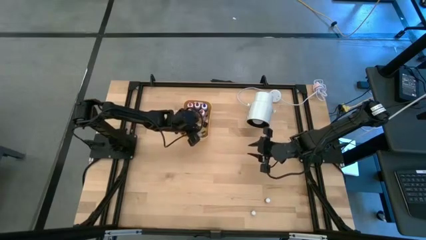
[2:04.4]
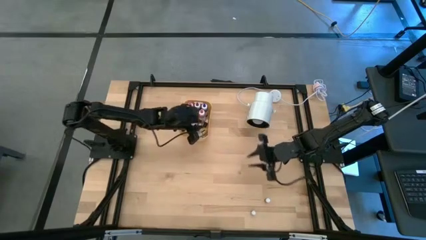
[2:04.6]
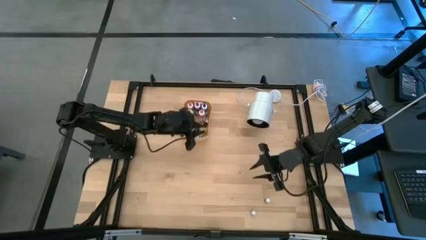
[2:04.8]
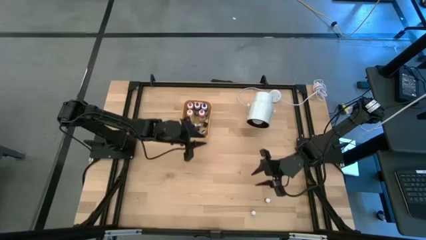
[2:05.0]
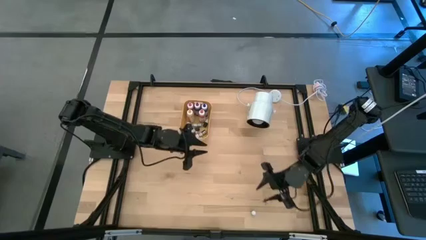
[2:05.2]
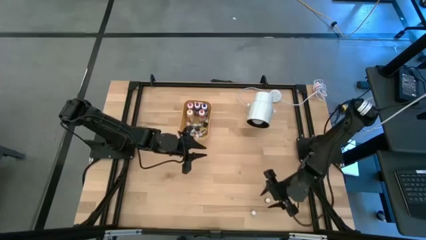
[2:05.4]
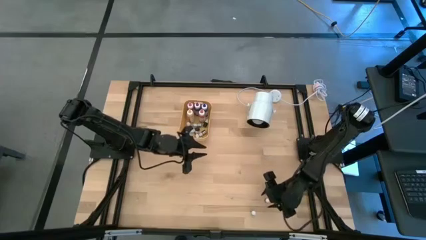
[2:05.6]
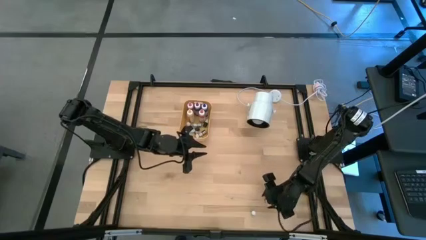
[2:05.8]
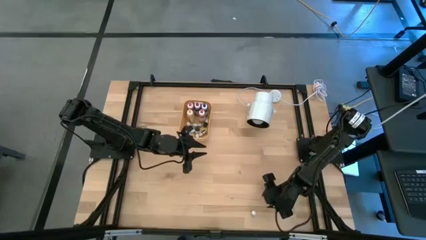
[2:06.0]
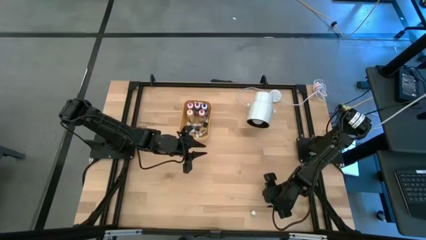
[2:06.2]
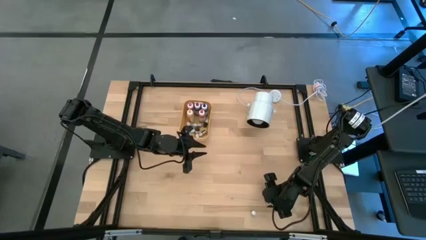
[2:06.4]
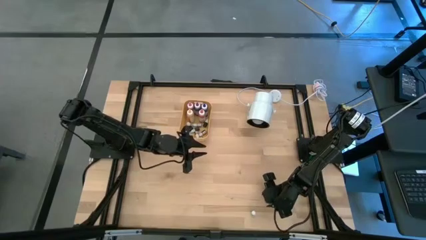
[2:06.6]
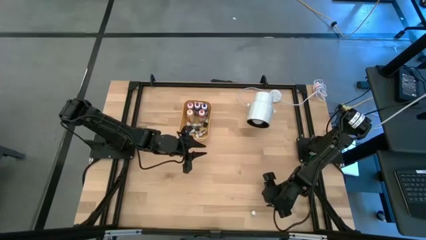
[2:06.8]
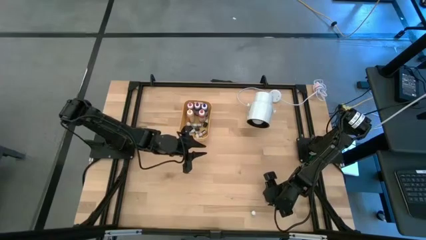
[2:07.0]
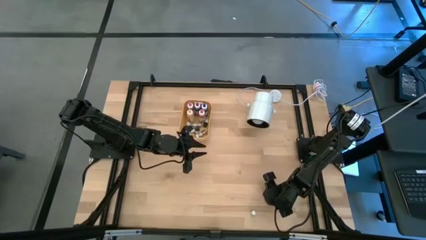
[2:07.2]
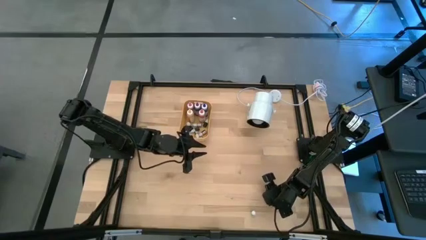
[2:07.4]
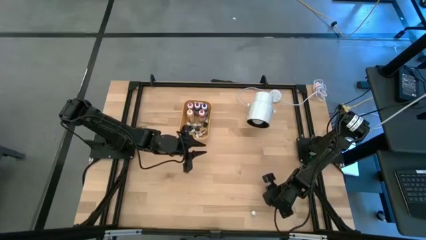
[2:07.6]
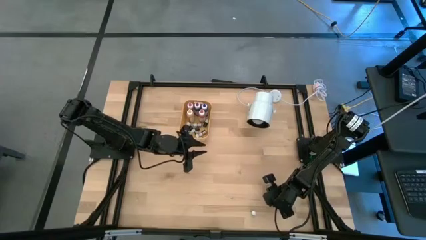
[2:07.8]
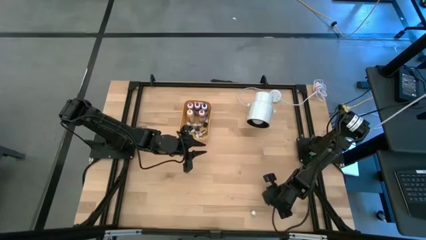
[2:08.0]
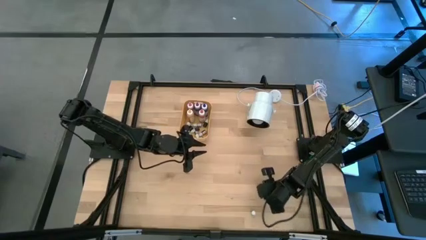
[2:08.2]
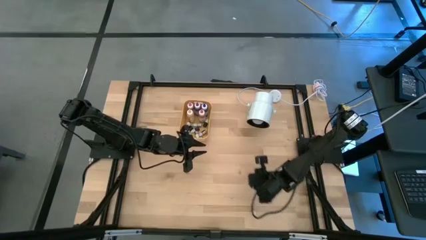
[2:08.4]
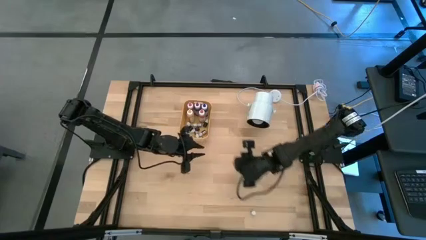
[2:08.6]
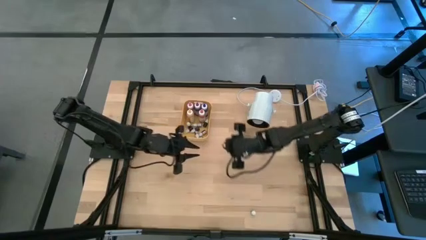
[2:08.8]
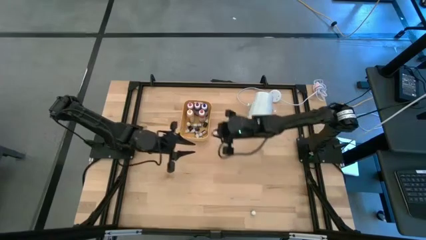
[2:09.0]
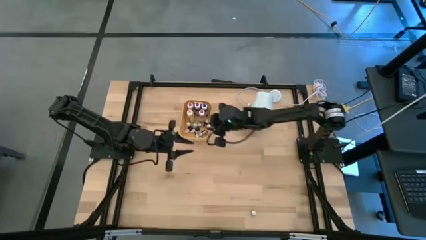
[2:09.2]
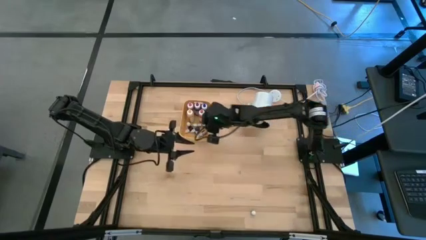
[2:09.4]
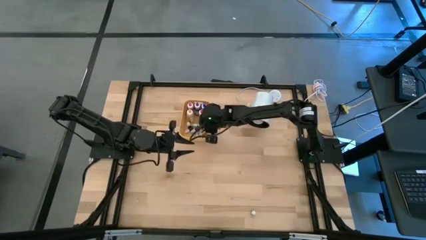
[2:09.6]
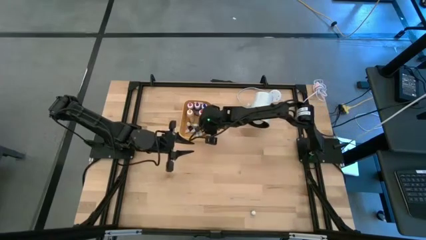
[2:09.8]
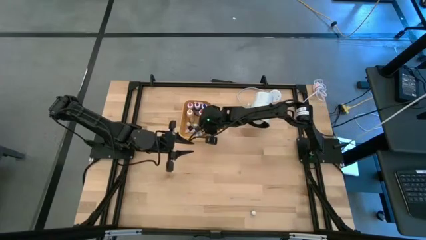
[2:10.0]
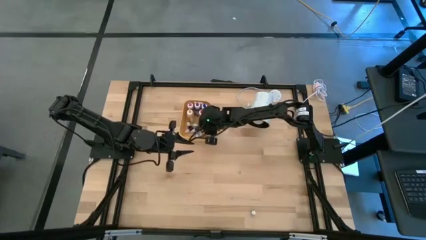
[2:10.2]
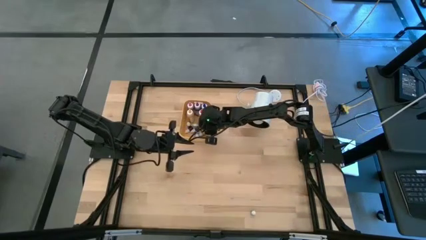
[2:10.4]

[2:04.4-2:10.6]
Task: Pick & Place food coloring
Put the small pink food coloring bottle into the yellow bin

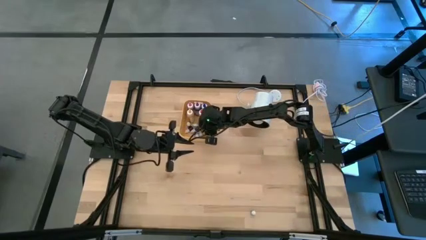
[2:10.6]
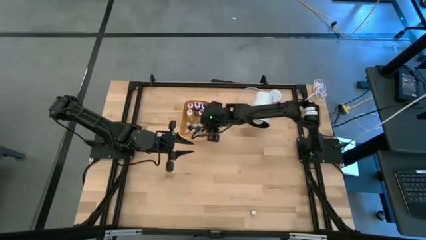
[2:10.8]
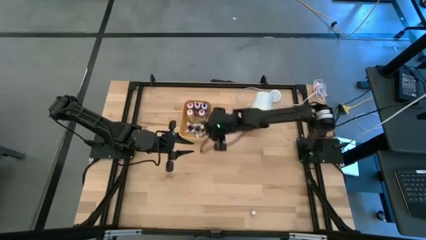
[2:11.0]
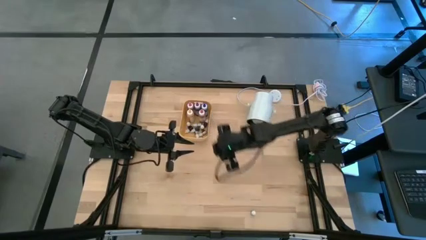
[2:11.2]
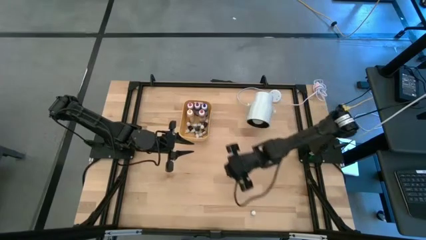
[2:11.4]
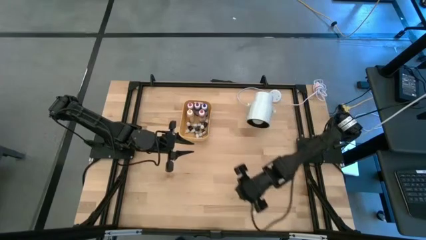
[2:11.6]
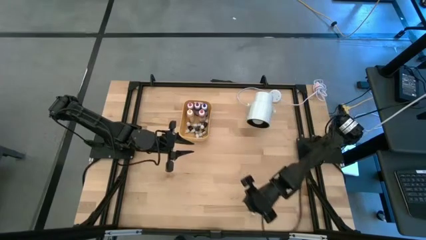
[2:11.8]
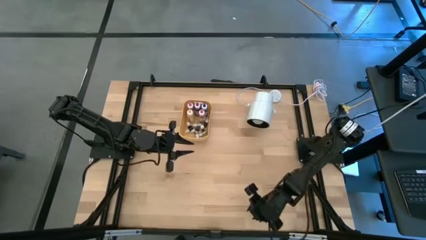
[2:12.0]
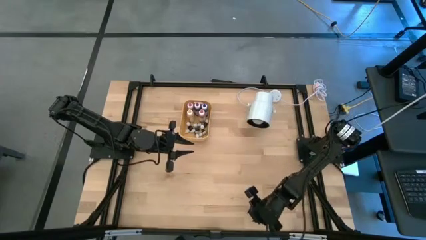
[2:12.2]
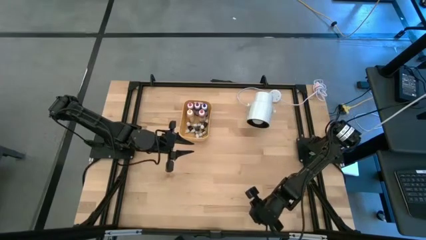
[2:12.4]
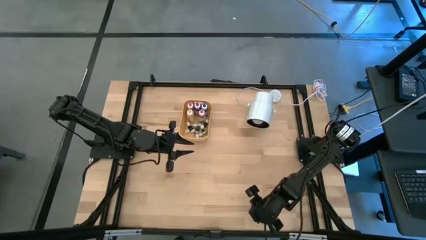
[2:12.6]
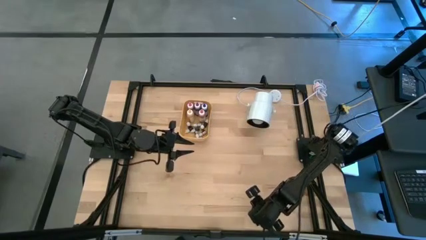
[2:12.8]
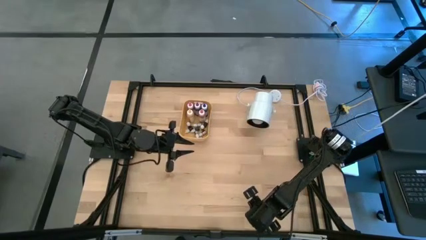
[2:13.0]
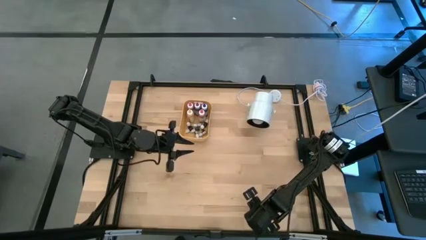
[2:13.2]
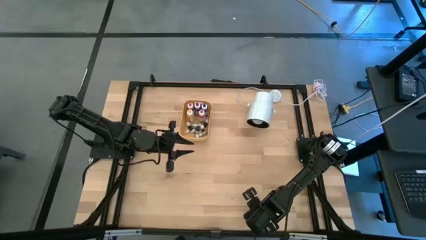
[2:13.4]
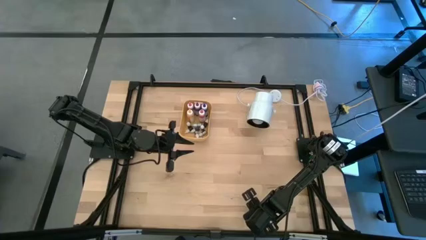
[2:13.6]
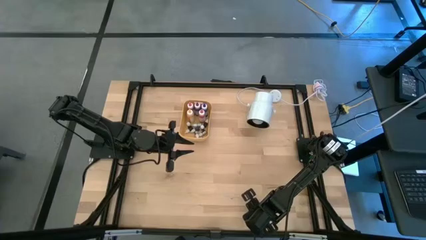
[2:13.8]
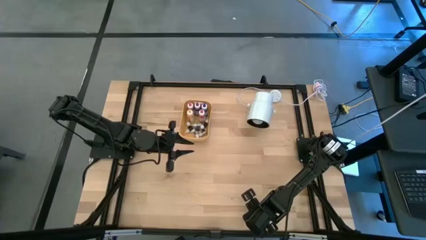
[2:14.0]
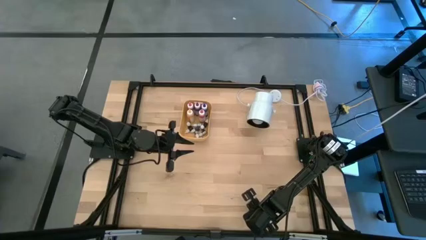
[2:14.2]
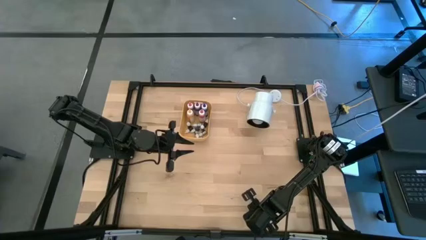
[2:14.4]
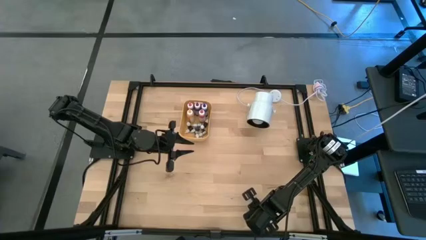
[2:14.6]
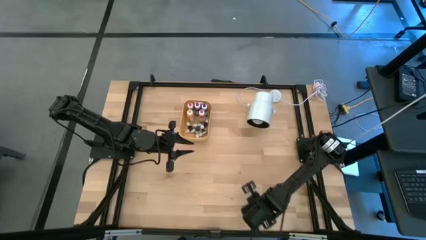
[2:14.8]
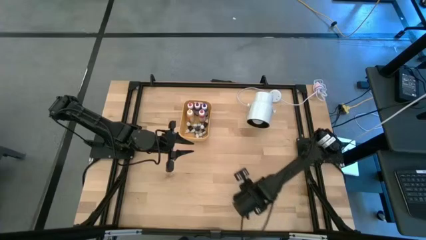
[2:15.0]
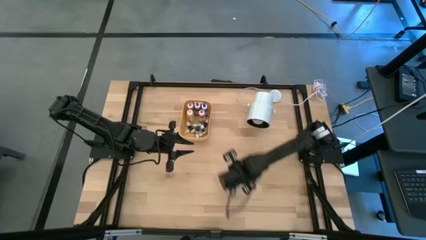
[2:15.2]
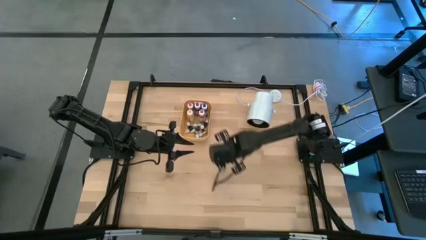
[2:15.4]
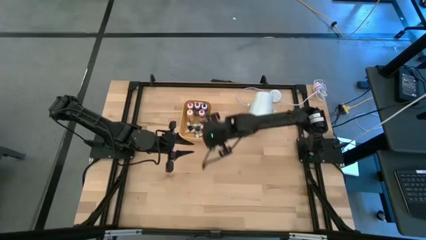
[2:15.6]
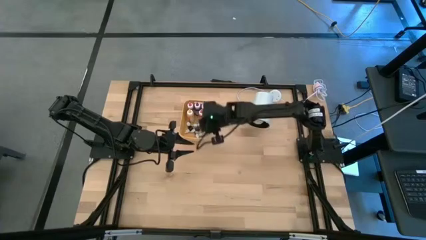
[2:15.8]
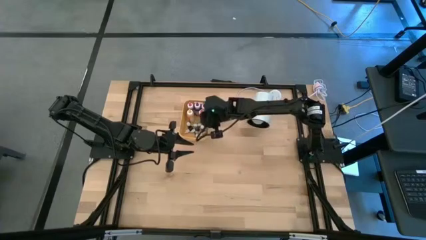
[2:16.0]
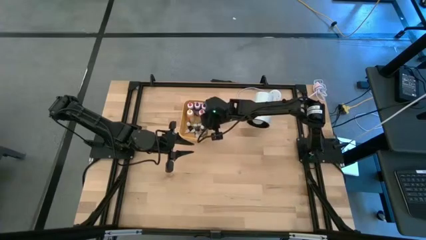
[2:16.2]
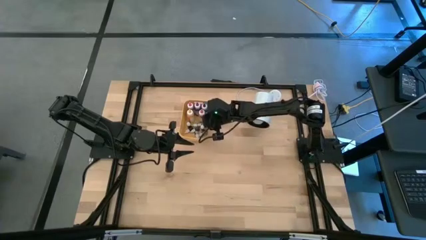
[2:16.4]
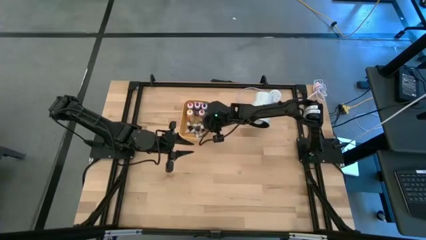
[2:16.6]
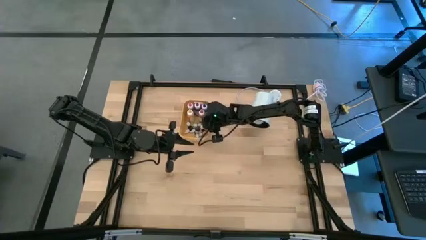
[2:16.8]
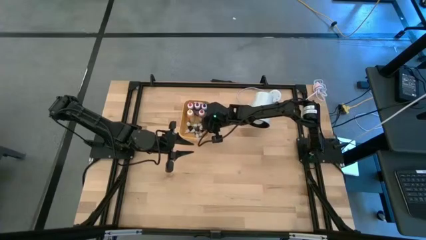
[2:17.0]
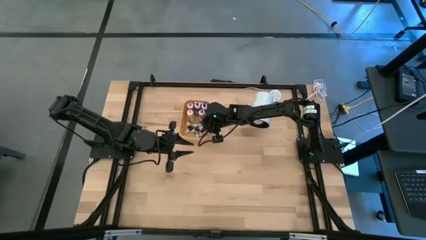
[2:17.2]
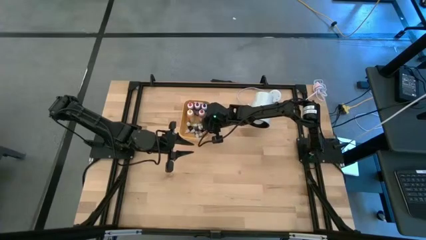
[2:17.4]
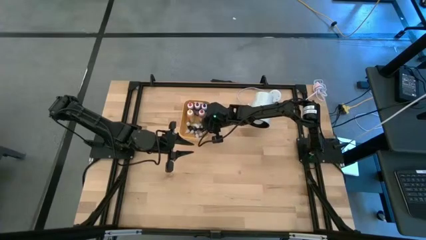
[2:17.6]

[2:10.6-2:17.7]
Put the small red food coloring bottle into the yellow bin

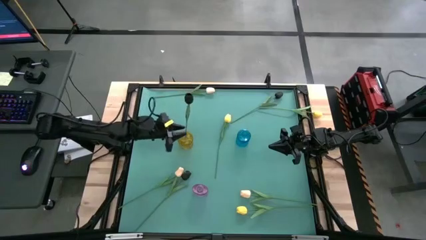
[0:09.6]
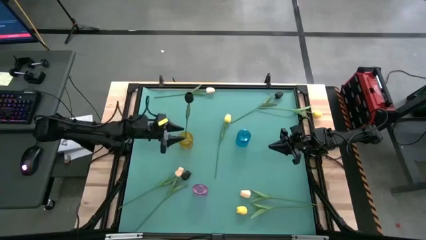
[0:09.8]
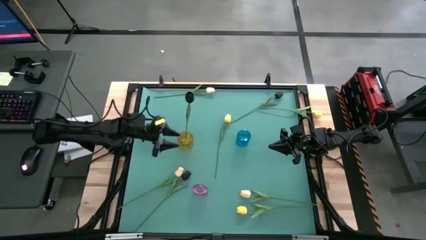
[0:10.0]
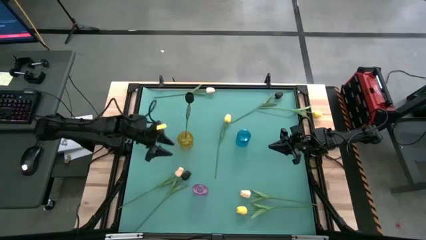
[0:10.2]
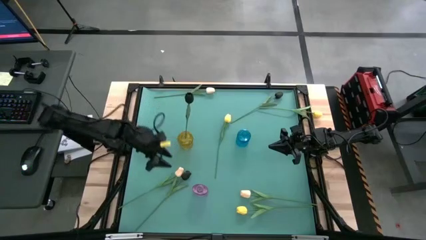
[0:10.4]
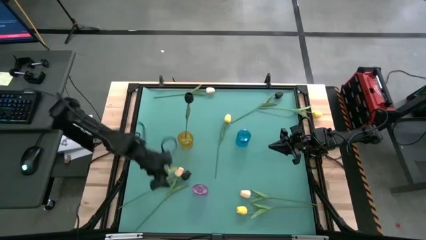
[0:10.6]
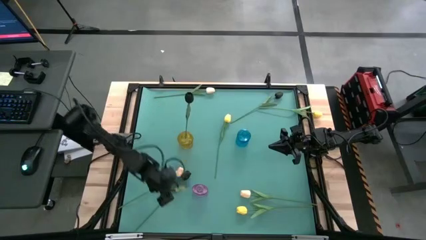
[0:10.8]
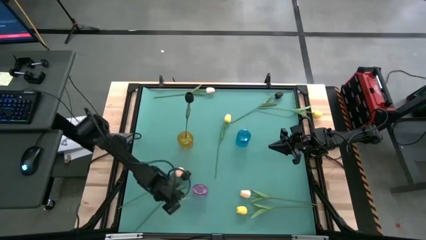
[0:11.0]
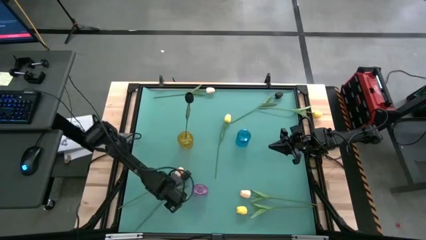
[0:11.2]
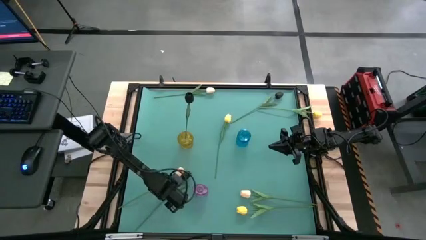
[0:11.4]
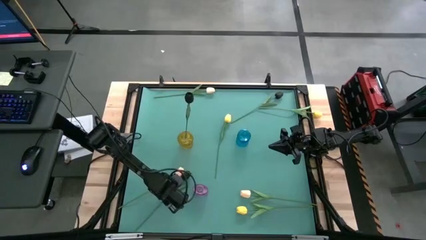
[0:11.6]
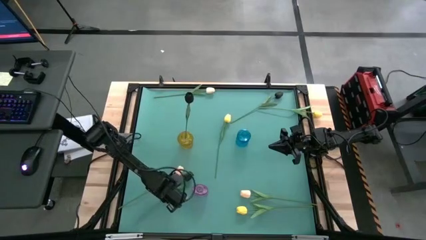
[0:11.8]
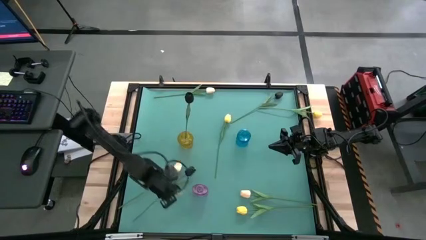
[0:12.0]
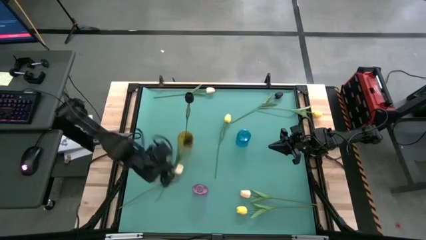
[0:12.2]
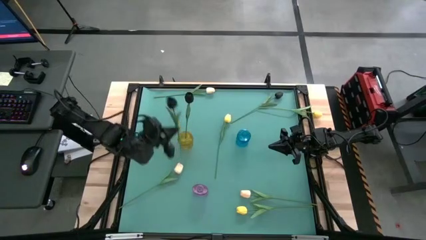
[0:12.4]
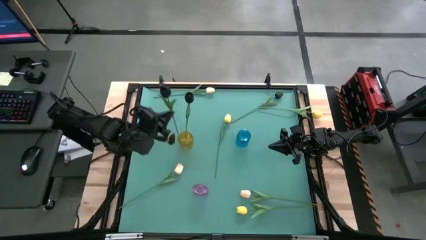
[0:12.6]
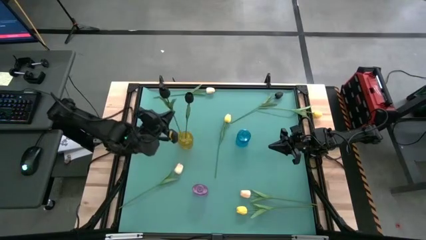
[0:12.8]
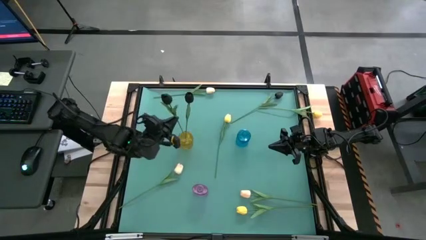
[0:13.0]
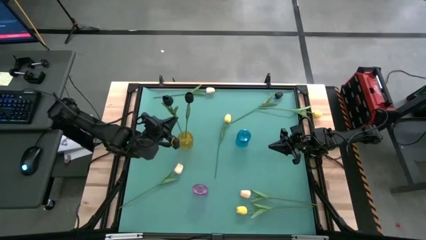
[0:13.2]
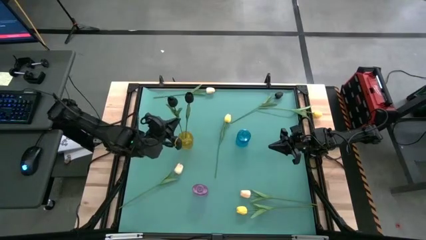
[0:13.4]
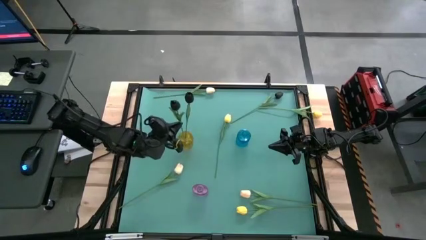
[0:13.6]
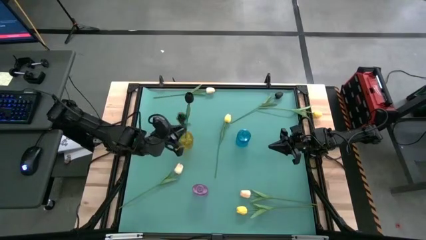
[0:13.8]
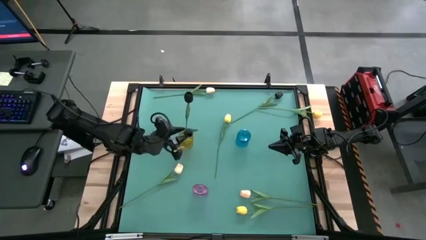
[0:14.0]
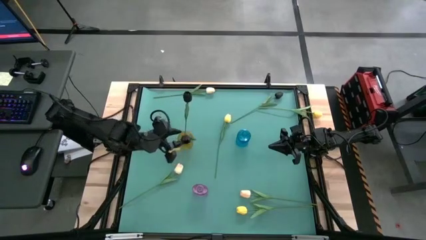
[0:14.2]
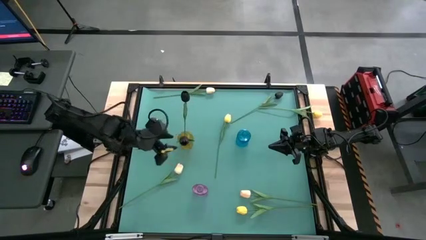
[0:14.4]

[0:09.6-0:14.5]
Task: Sort flowers into vase by color
Put the bottom black tulip flower into the yellow vase
